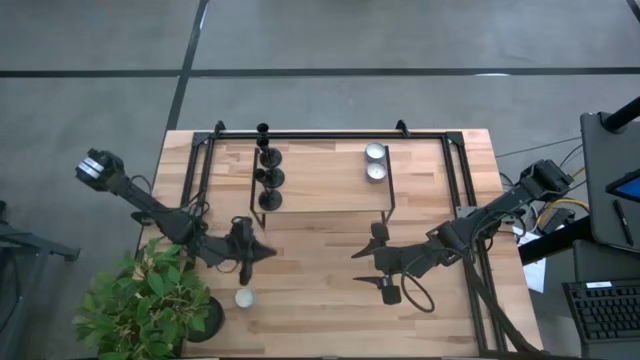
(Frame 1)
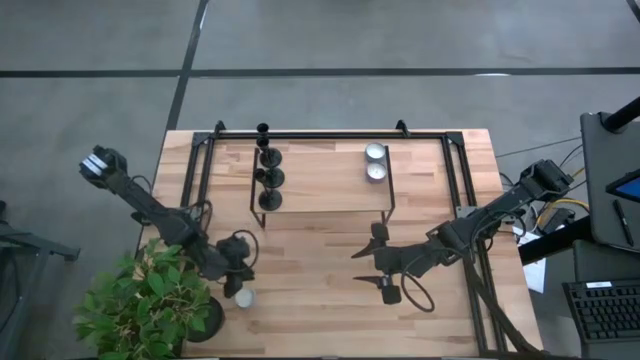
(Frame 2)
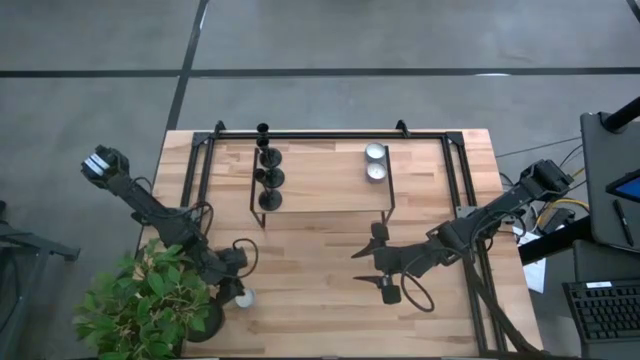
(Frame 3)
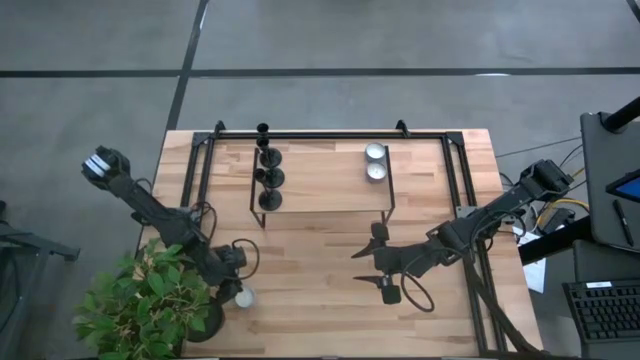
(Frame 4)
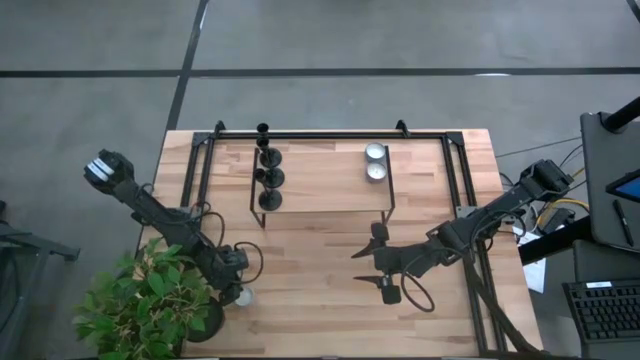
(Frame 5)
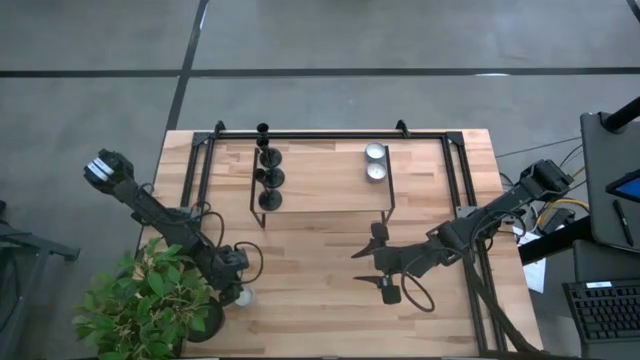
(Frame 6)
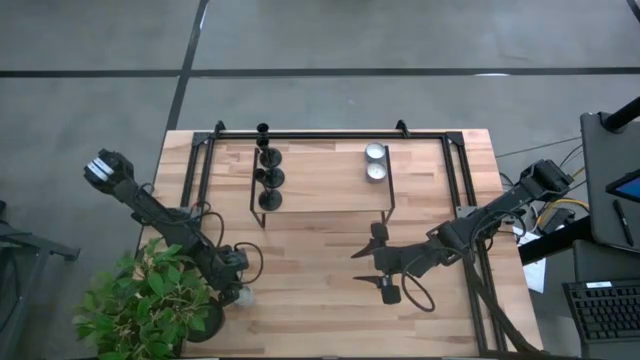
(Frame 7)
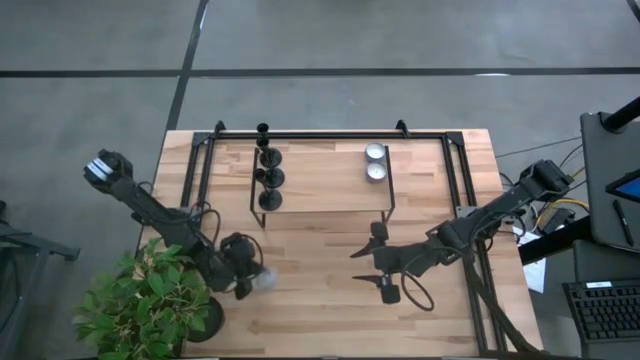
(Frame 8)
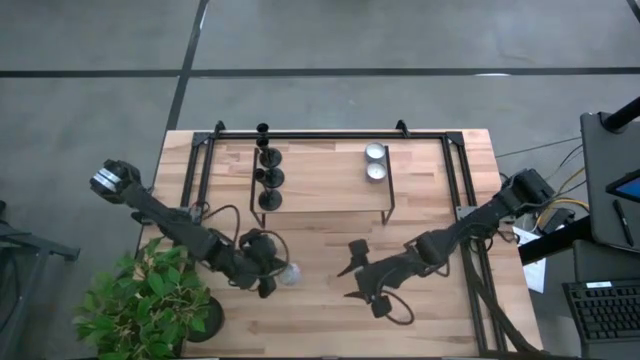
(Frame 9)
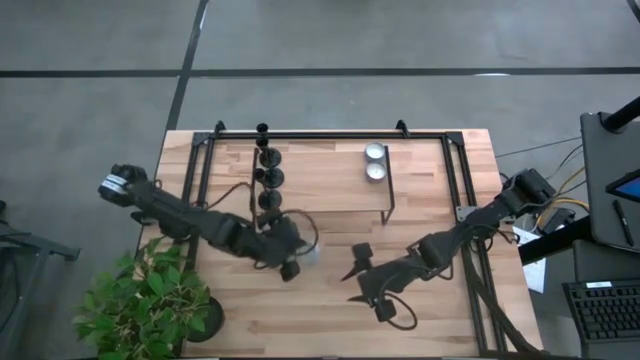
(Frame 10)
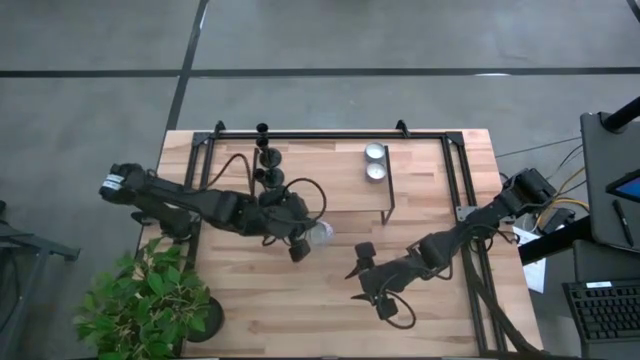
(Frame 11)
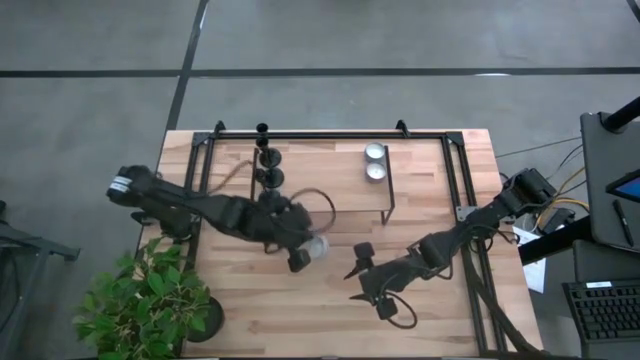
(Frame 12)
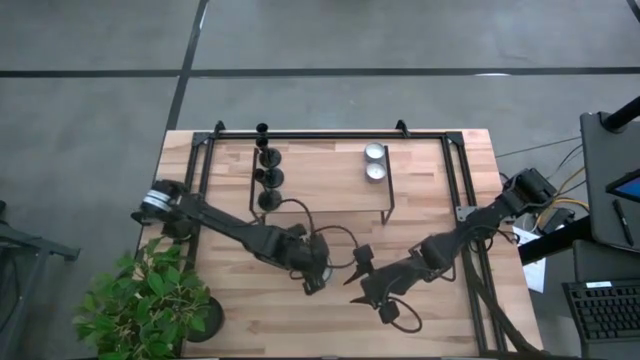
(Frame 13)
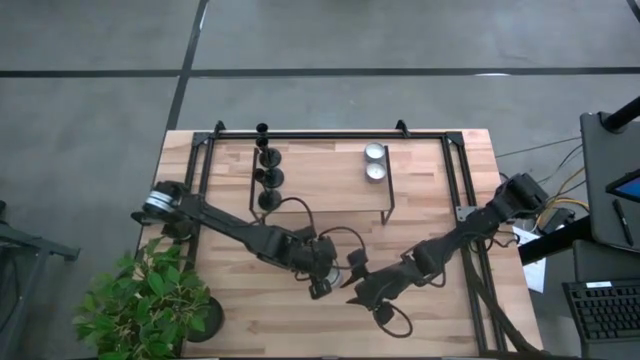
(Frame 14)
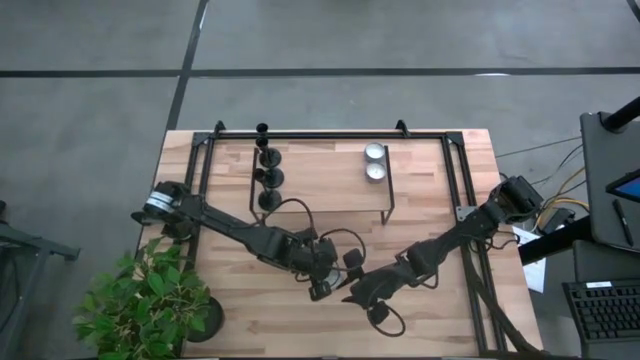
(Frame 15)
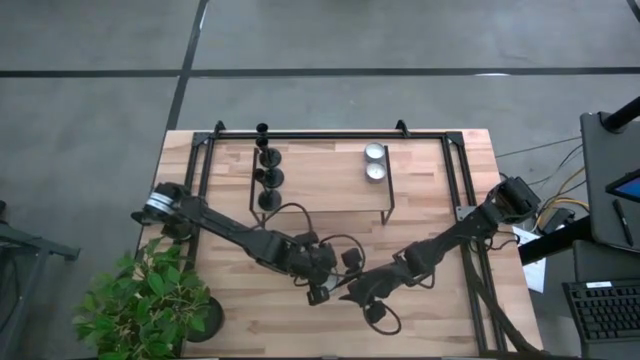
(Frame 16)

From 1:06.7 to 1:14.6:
Task: Pick & Place candle stick holders
Put the white candle on the shelf

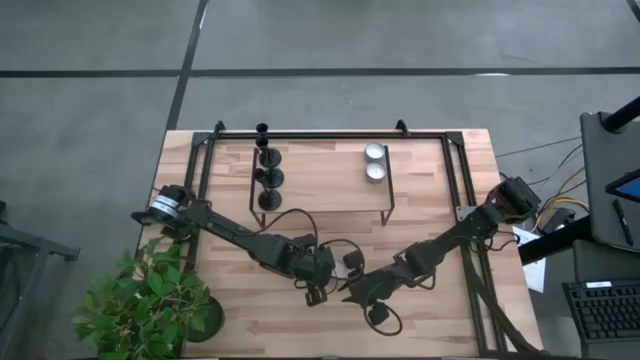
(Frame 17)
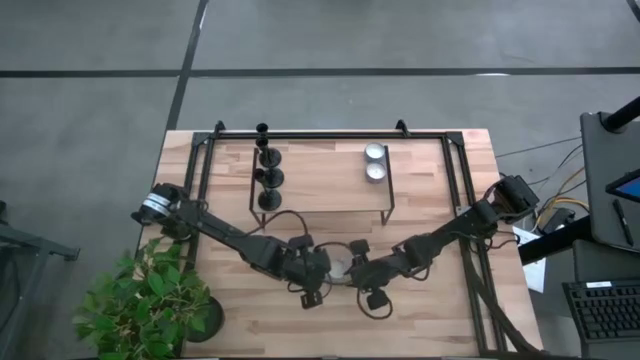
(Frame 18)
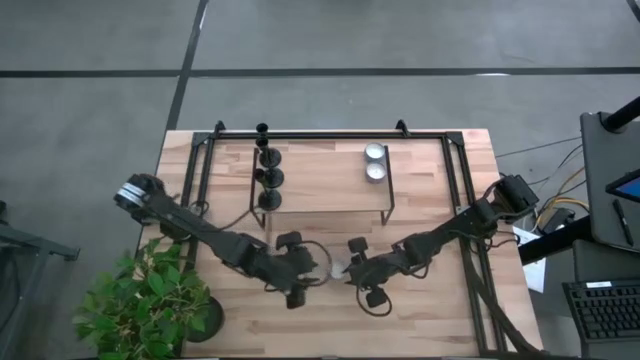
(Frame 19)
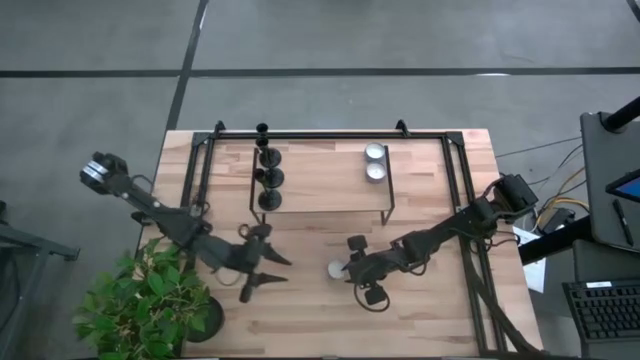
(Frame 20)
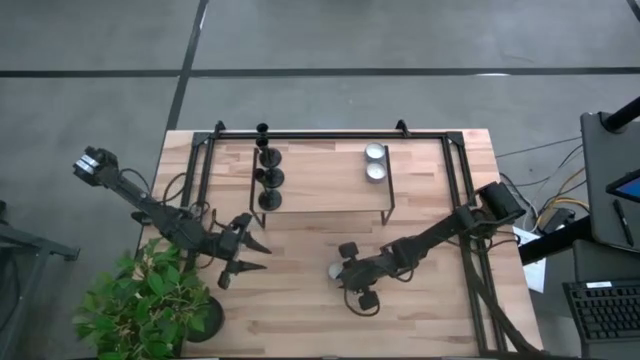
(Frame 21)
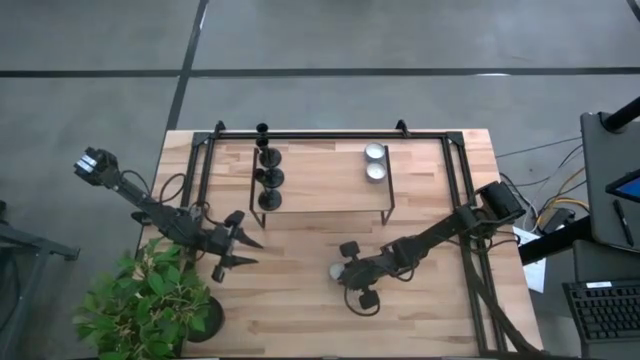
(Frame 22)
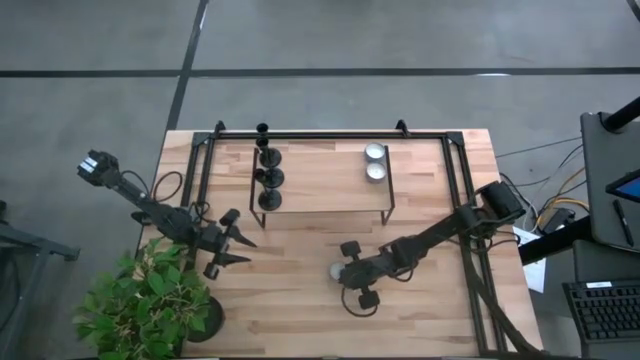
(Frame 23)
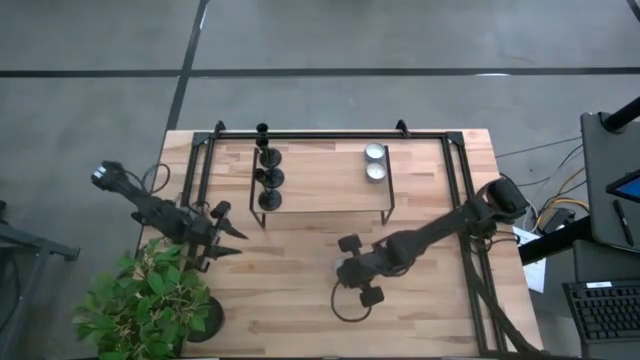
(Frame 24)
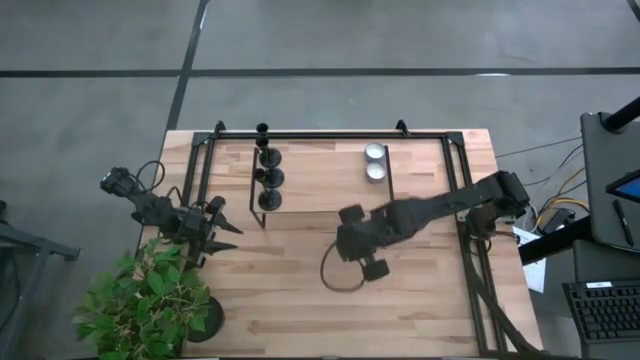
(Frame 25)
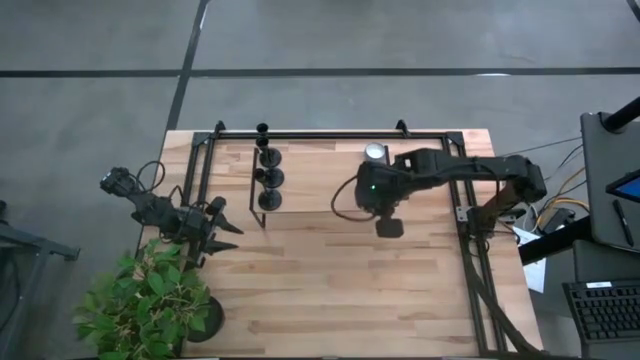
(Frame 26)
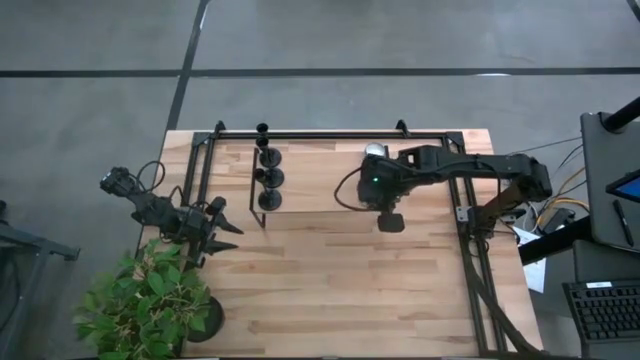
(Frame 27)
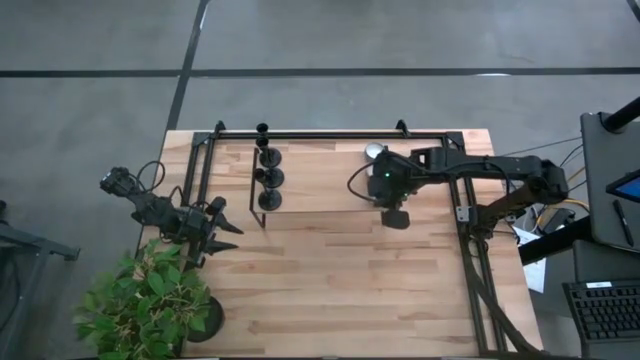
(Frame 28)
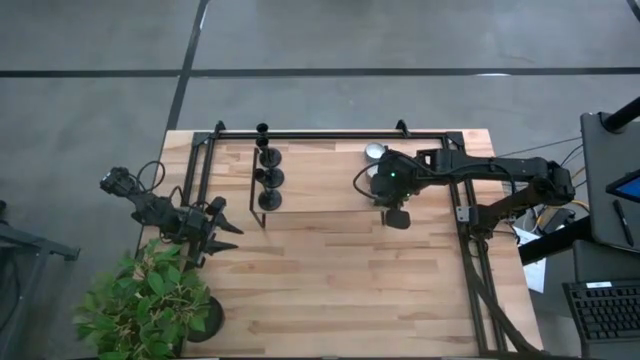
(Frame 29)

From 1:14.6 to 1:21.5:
Put the white patterned candle on the shelf

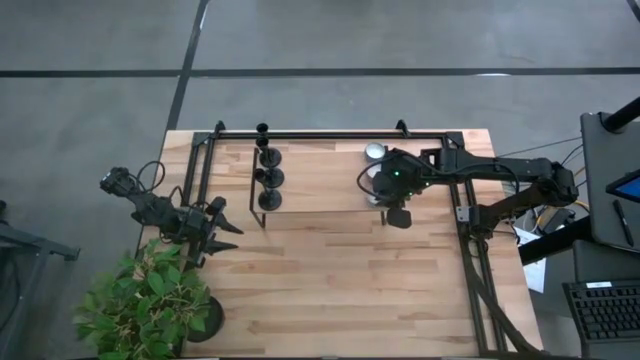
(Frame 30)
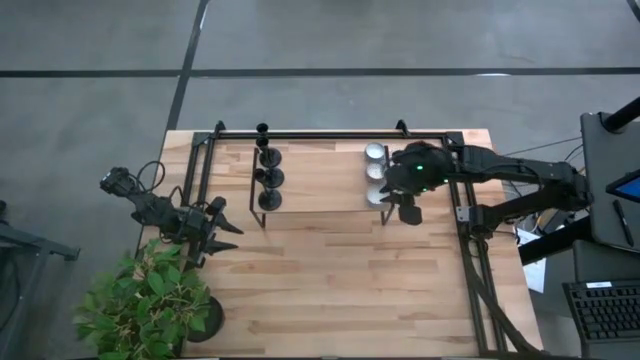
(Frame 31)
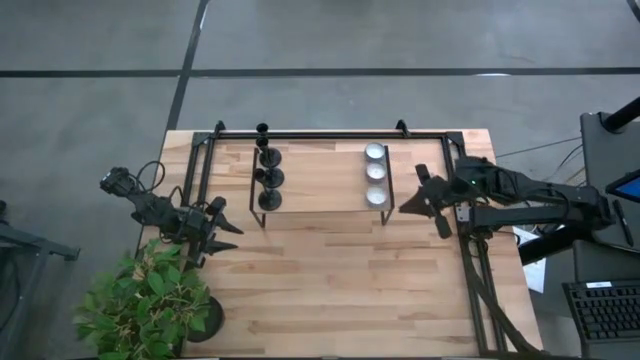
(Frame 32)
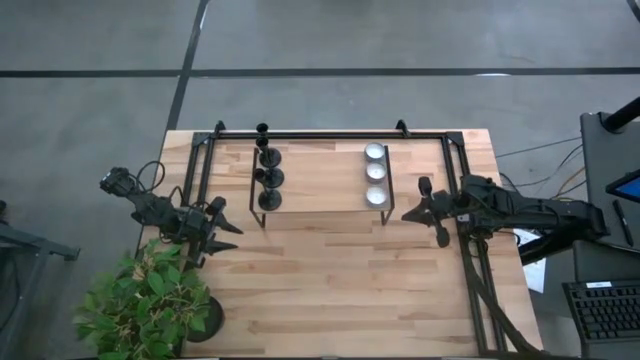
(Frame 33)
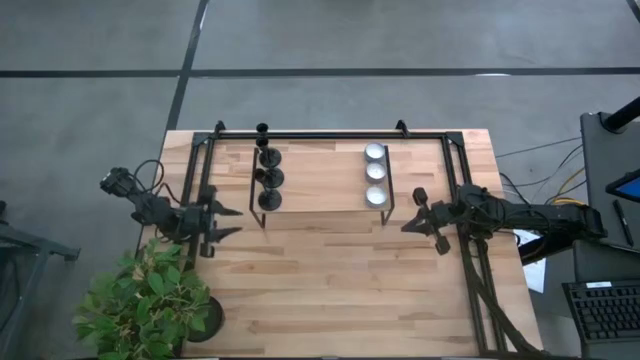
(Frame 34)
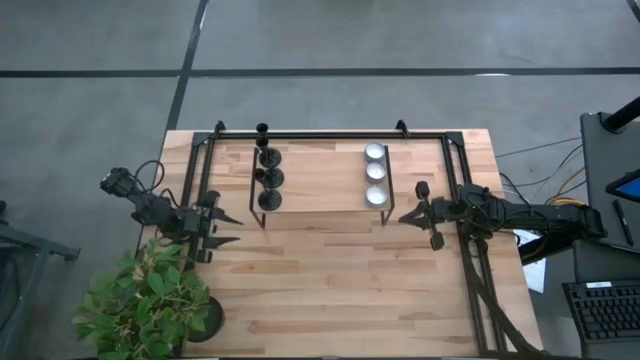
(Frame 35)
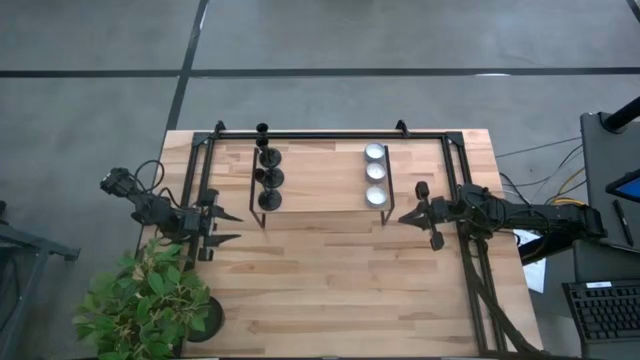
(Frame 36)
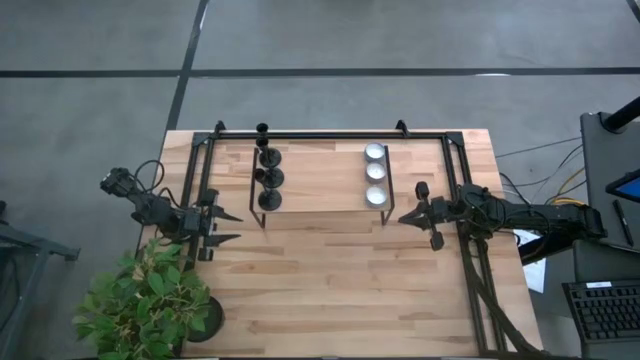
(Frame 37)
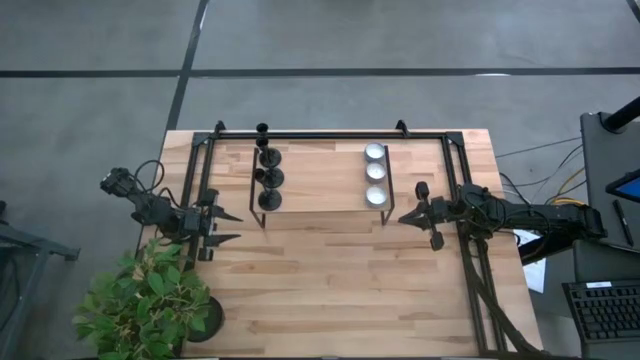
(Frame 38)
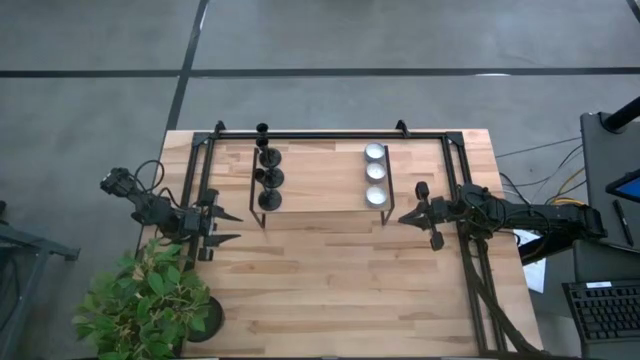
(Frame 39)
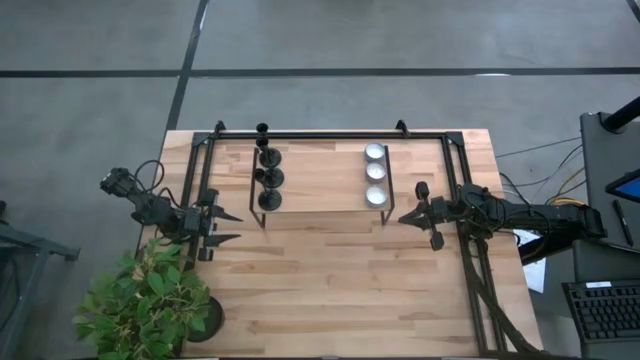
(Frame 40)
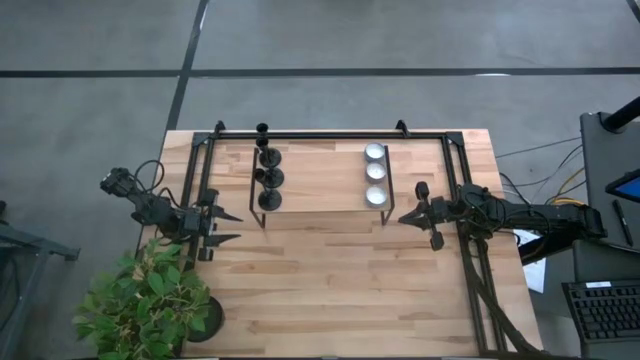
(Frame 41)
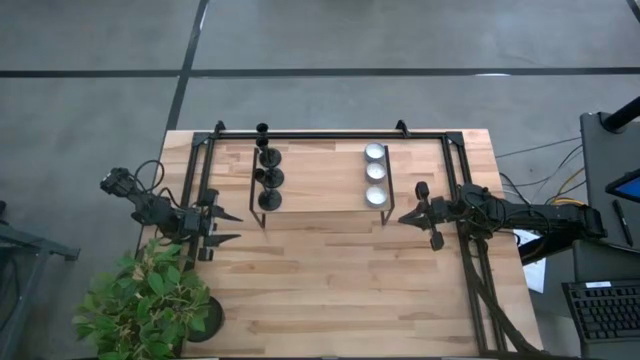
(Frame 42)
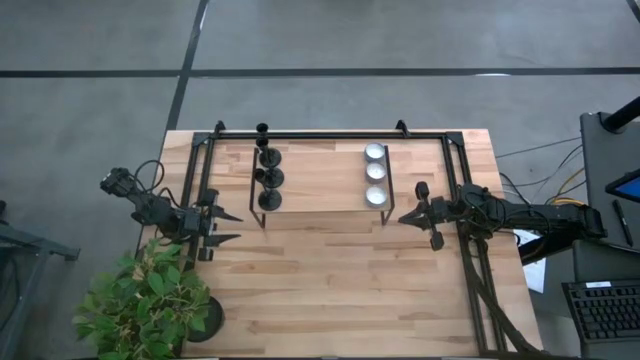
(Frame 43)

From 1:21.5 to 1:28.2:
Return to Home Position
